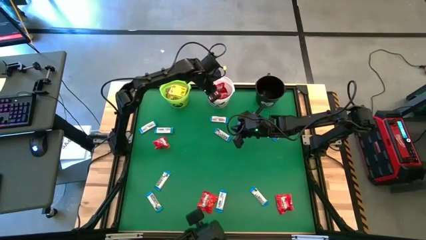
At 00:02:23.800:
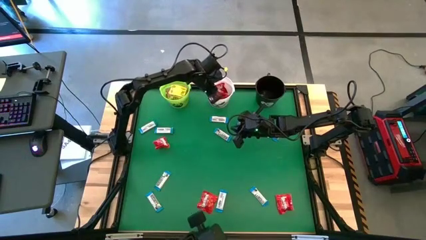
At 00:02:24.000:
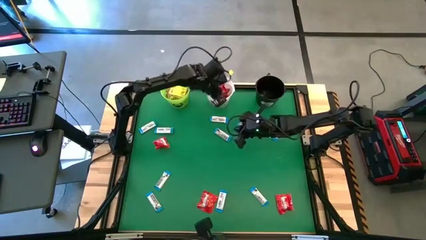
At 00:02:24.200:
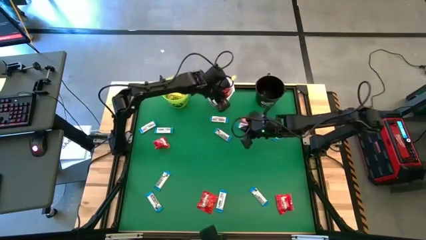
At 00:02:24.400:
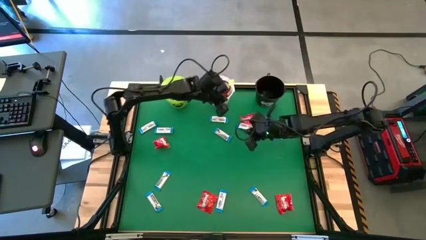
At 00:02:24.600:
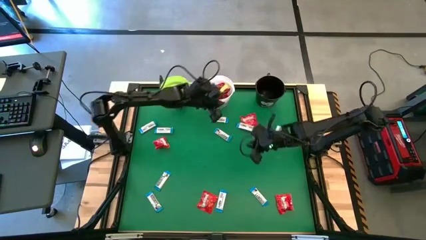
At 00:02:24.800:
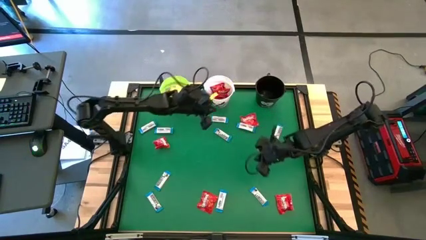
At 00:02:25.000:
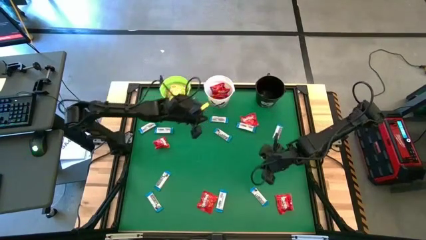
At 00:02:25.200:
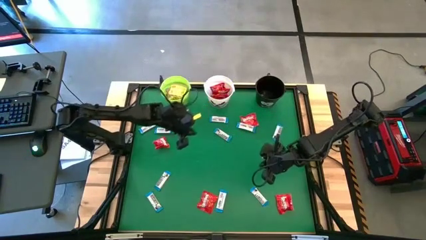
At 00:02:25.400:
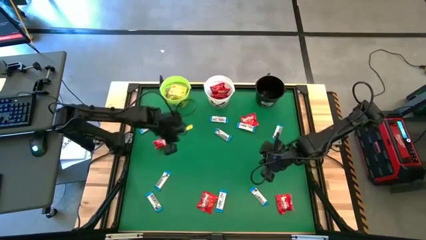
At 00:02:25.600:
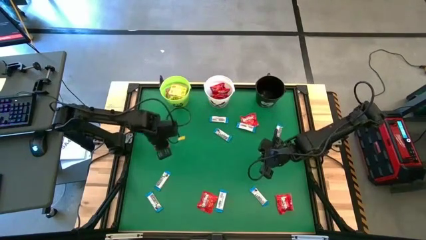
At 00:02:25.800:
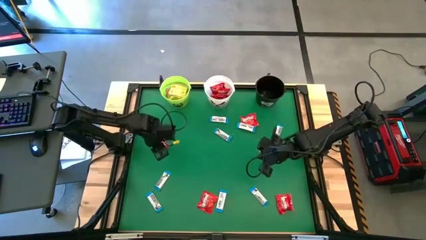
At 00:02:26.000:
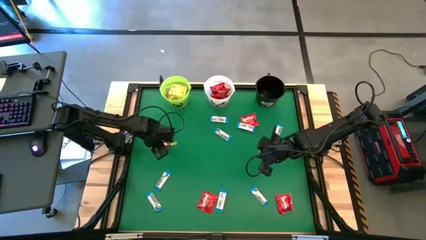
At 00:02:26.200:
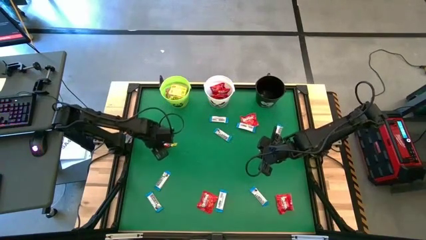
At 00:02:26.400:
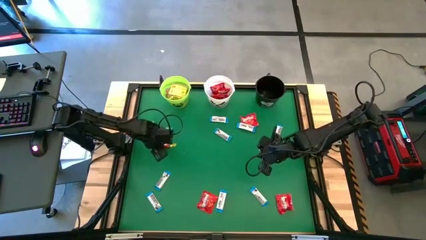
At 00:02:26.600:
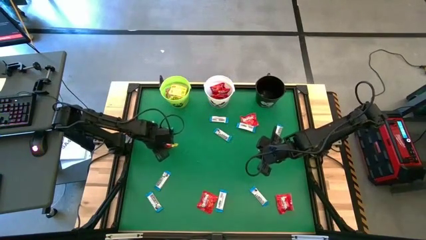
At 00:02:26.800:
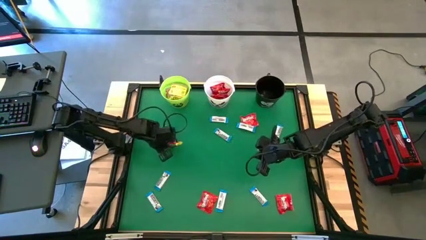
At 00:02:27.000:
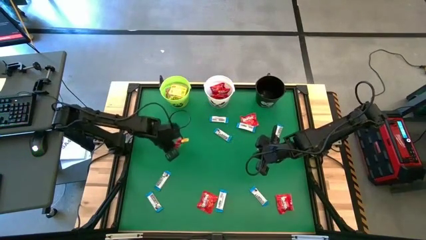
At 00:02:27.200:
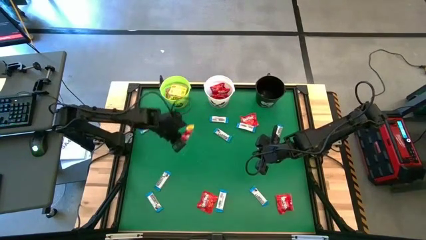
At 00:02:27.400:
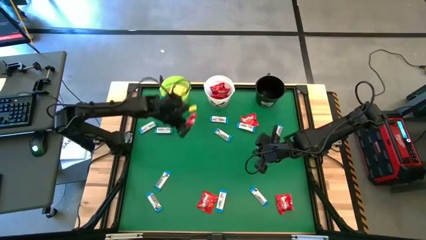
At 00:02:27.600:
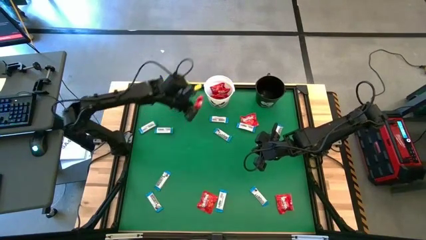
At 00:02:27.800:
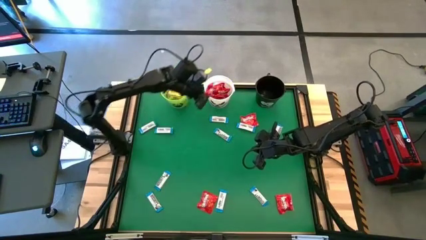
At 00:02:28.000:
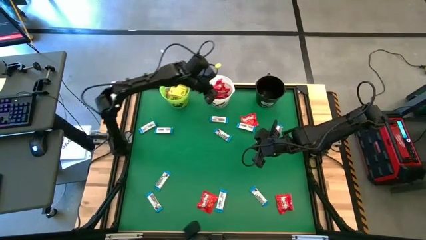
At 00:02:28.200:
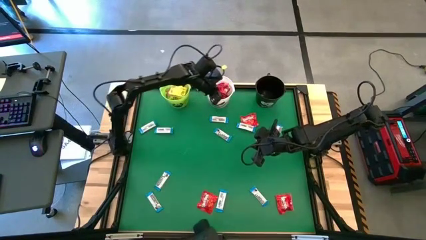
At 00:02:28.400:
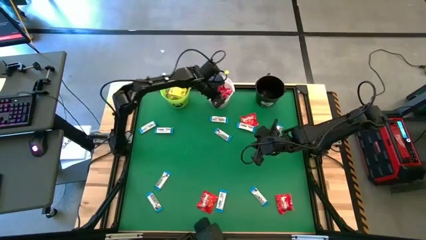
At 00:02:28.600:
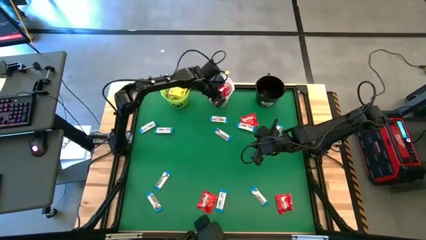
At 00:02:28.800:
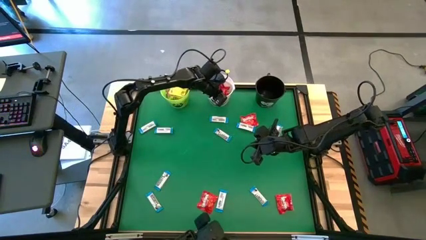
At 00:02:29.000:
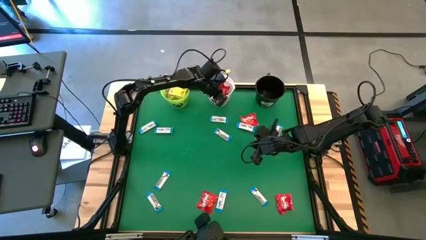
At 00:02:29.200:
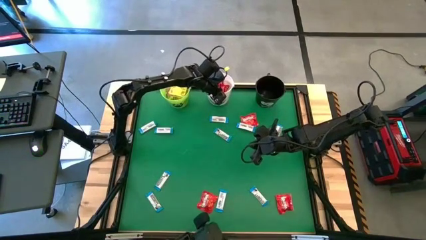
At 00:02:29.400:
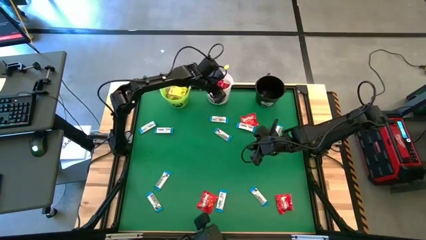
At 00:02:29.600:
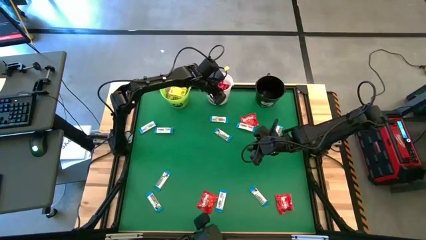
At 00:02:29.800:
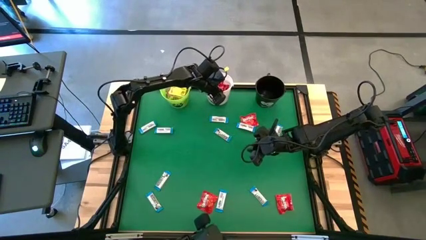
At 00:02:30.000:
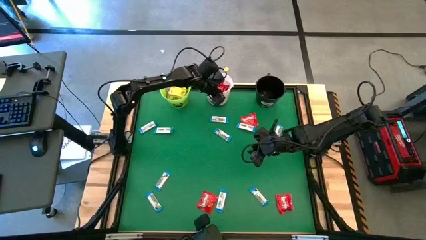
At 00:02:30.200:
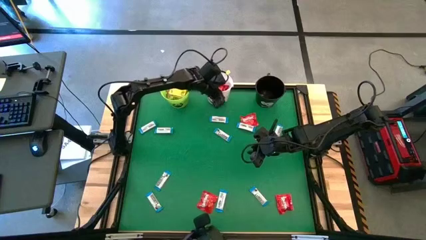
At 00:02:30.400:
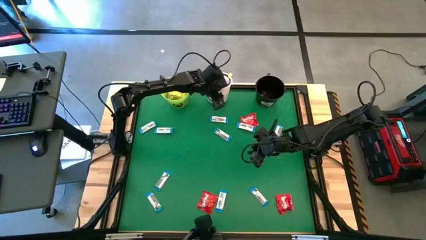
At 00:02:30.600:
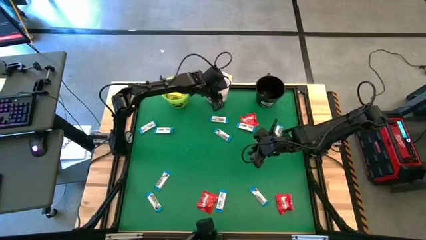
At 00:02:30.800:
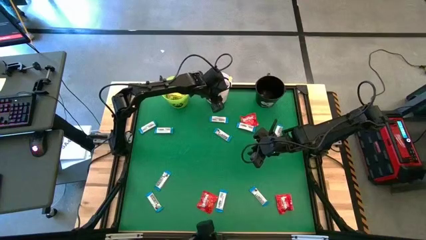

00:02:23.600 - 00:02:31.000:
Task: Sort candy by brand, put in halloween buckets
Put the red candy into the white bucket

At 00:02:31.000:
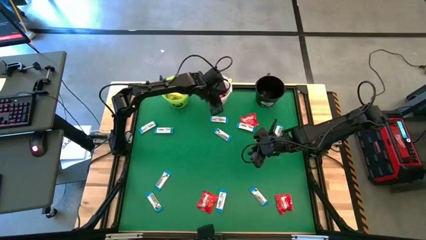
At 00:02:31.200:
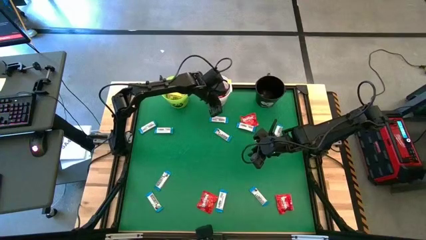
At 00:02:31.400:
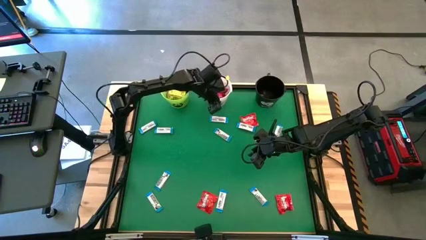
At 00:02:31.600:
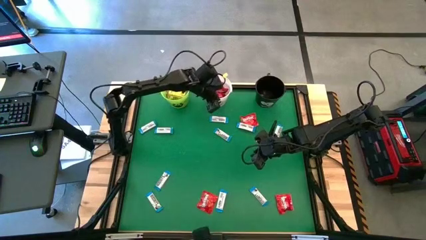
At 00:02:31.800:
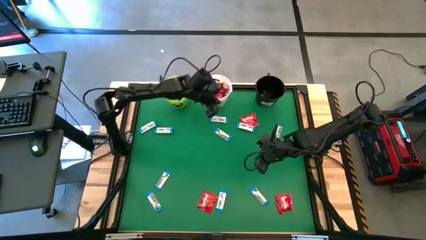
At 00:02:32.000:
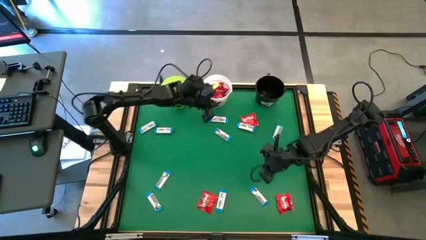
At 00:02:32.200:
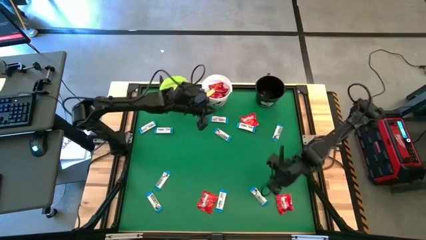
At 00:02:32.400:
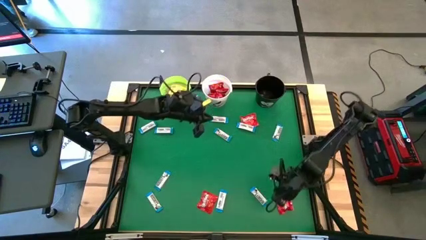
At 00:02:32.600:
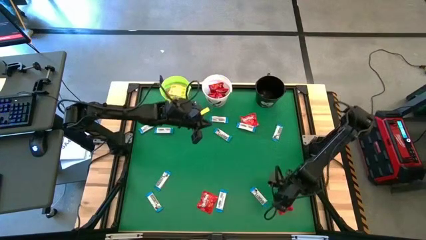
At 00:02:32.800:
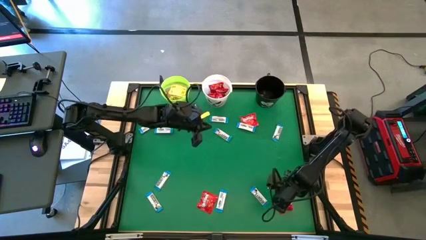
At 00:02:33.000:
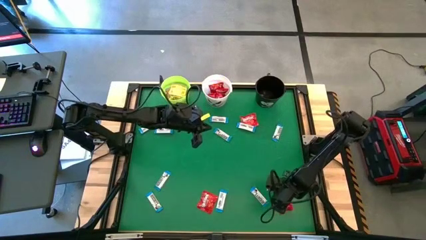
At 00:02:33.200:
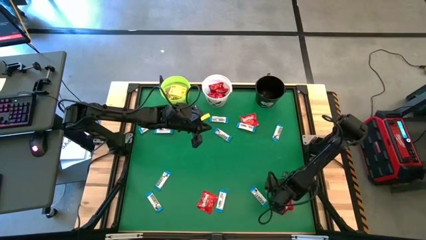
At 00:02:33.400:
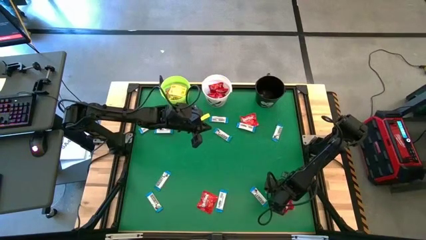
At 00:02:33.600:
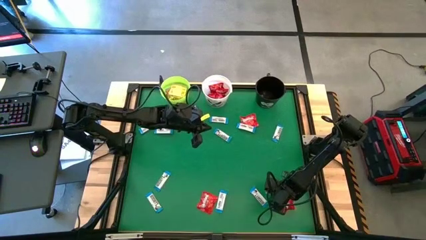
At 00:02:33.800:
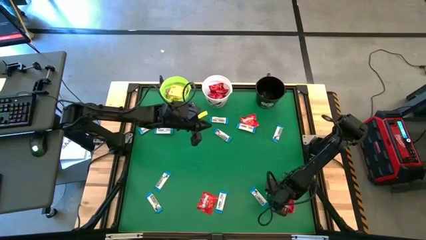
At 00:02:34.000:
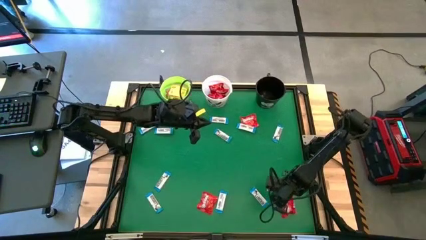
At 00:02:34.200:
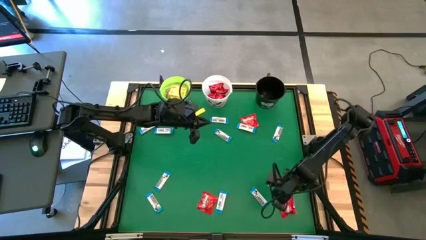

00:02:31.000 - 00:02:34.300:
Put the red candy into the white bucket

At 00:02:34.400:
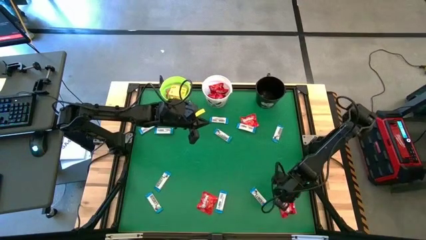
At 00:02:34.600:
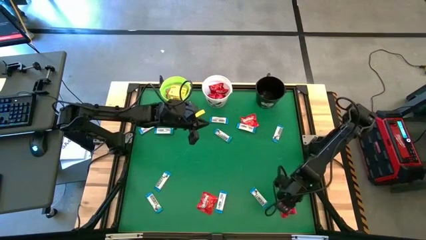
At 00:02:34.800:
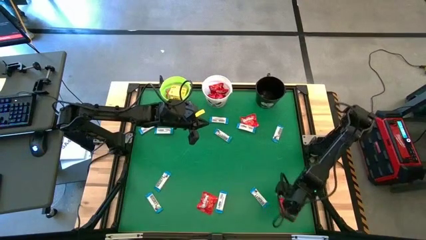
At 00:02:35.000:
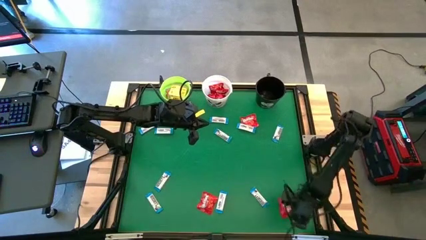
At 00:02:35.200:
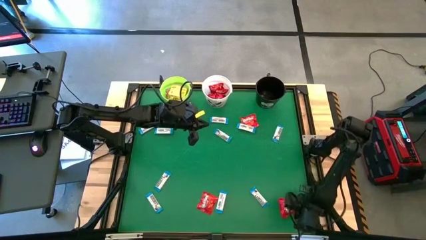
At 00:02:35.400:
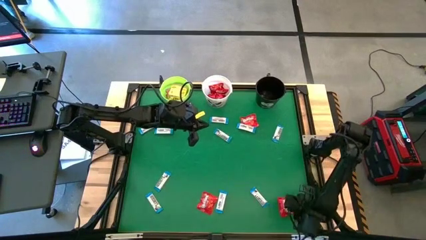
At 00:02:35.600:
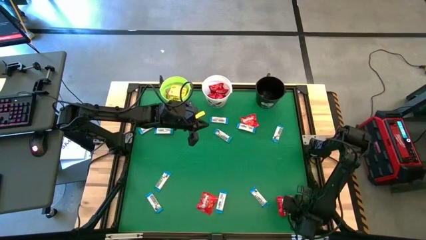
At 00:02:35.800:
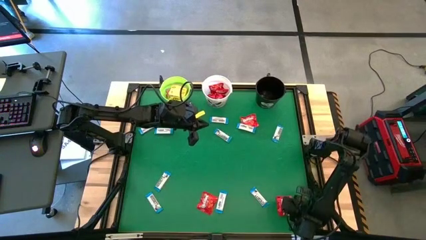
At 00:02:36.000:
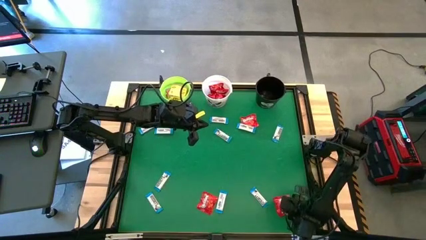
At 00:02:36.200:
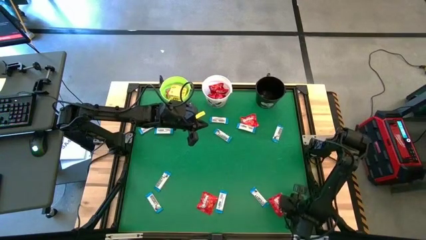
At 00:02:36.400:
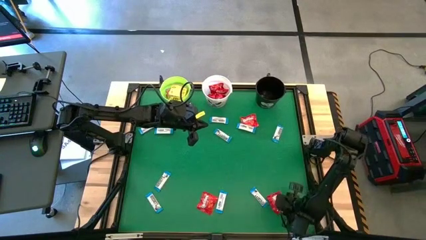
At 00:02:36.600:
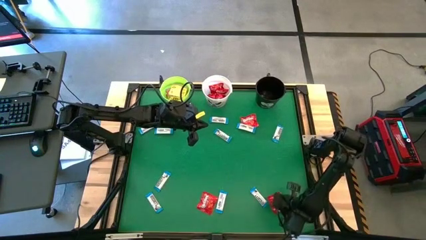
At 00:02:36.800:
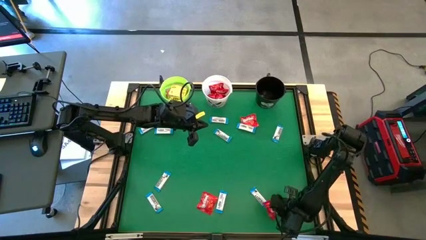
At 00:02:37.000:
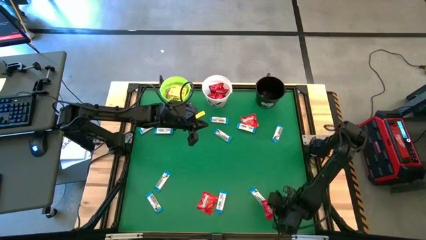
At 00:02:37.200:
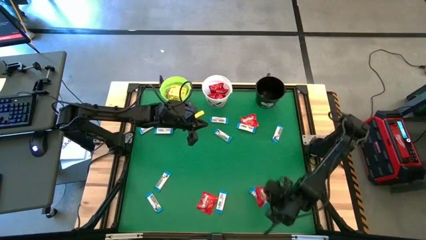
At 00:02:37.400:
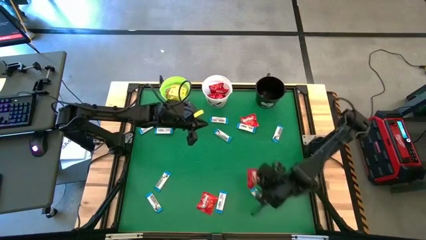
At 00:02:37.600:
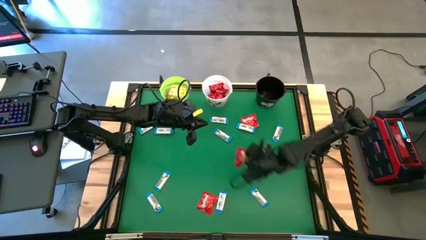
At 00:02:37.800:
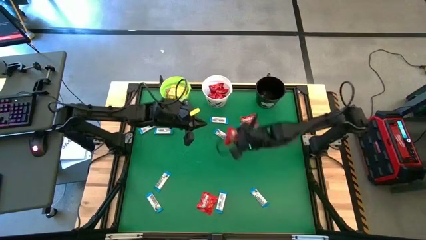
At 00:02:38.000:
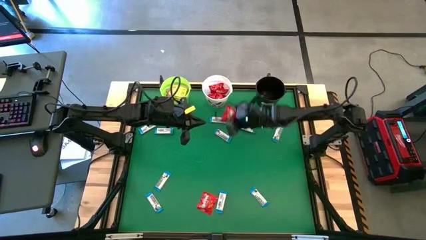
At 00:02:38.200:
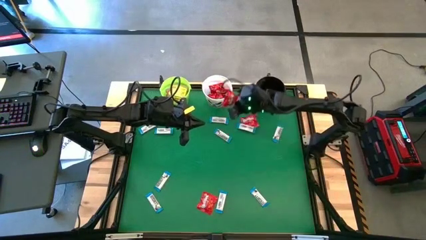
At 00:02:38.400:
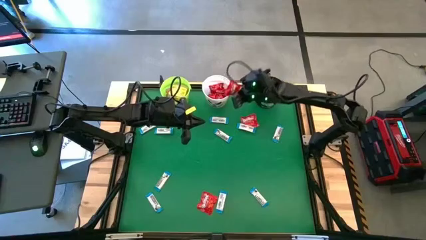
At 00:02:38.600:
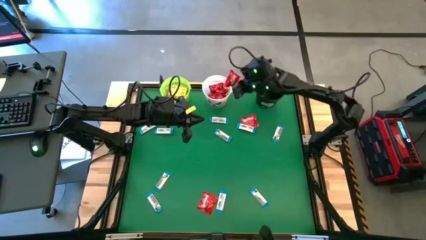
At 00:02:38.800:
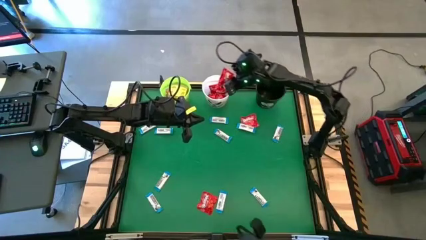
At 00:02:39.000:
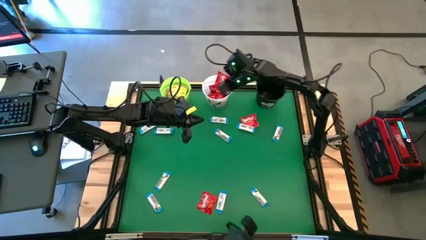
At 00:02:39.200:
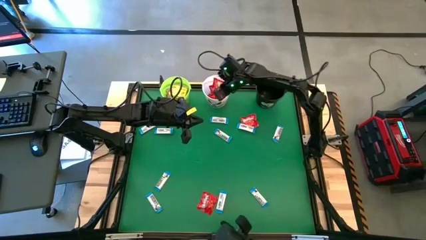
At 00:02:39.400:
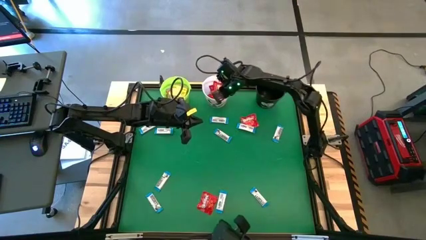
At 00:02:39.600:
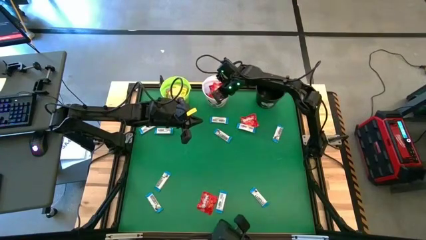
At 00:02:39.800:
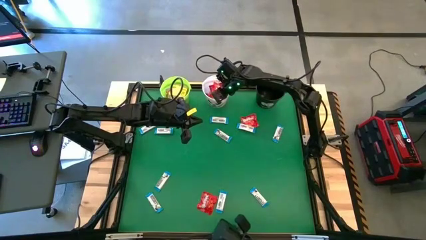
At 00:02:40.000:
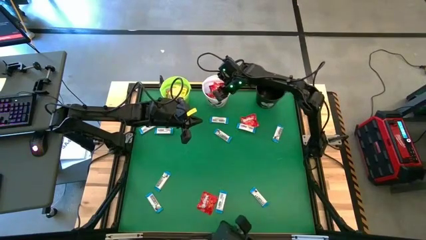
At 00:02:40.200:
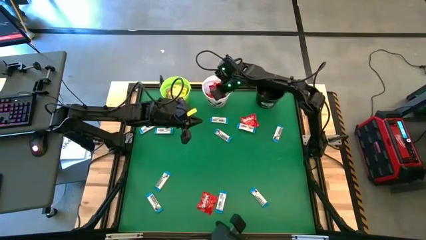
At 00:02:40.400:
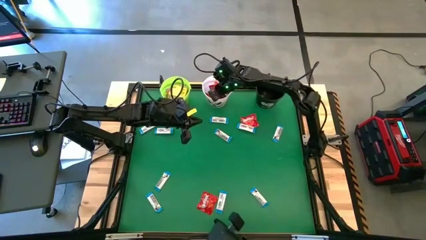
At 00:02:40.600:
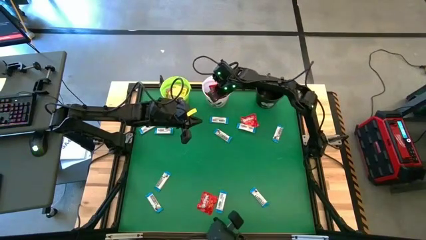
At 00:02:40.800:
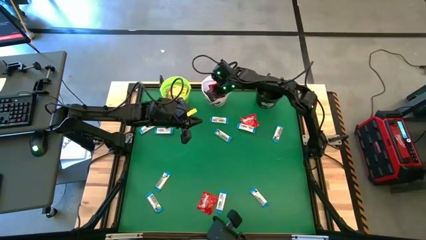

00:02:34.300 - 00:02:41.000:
Put the red candy into the white bucket
